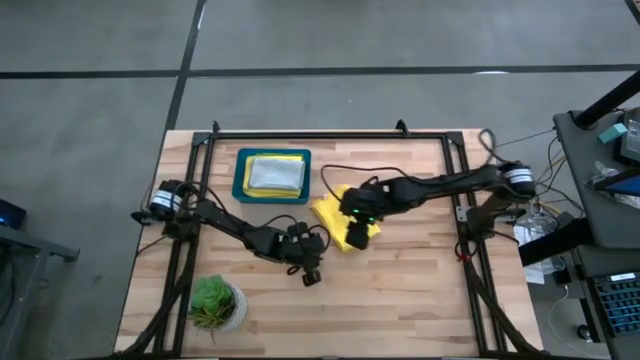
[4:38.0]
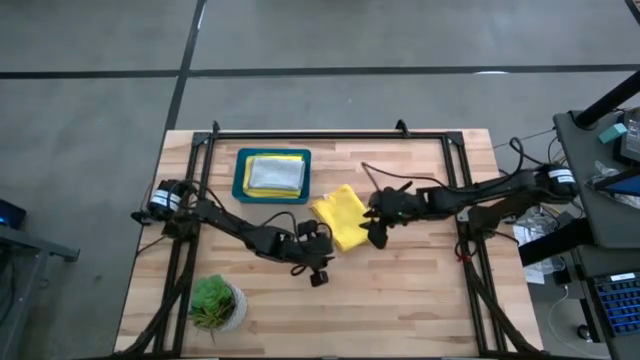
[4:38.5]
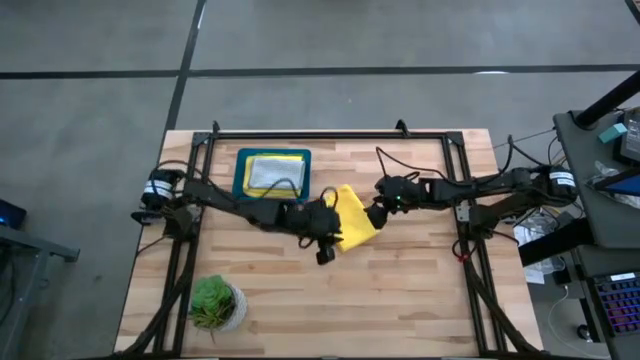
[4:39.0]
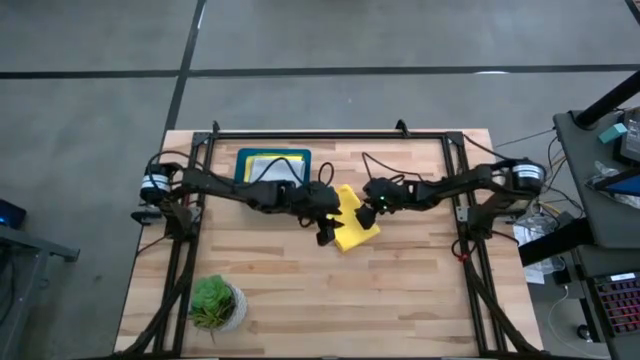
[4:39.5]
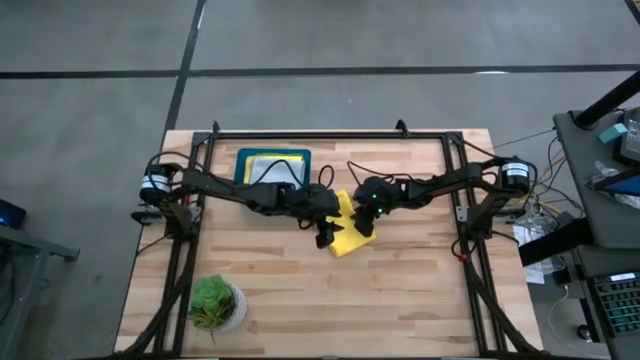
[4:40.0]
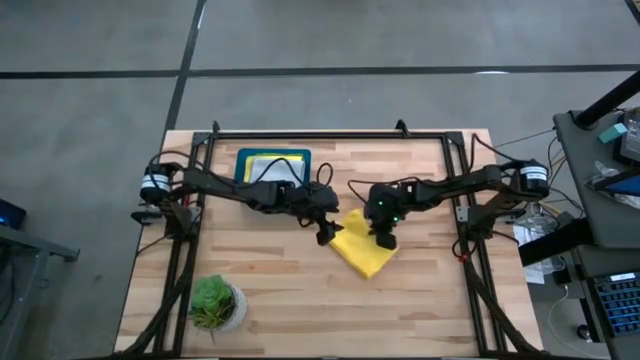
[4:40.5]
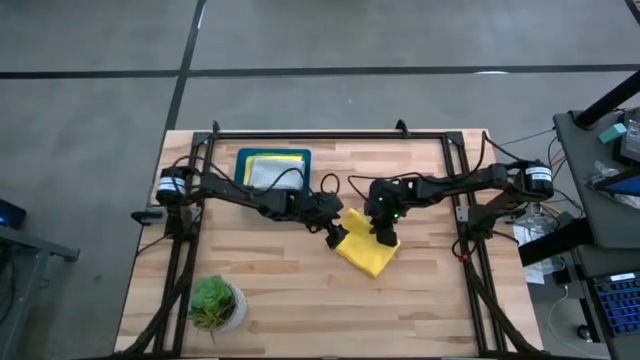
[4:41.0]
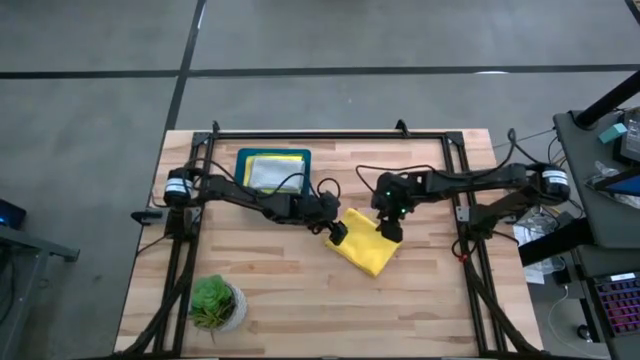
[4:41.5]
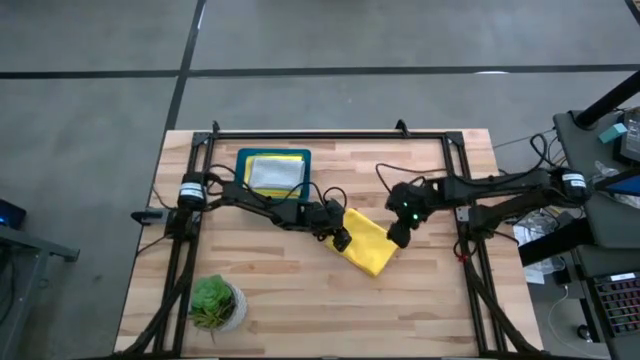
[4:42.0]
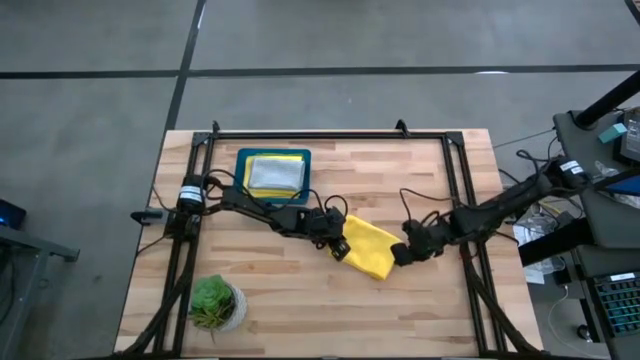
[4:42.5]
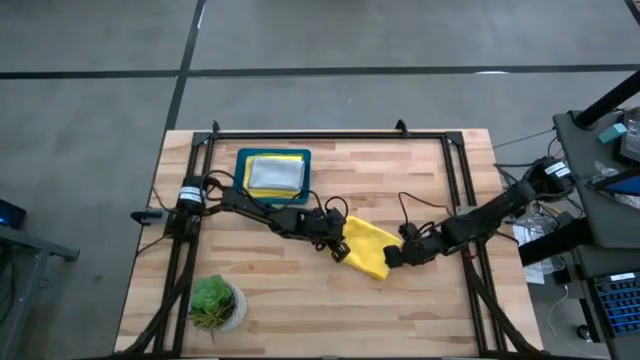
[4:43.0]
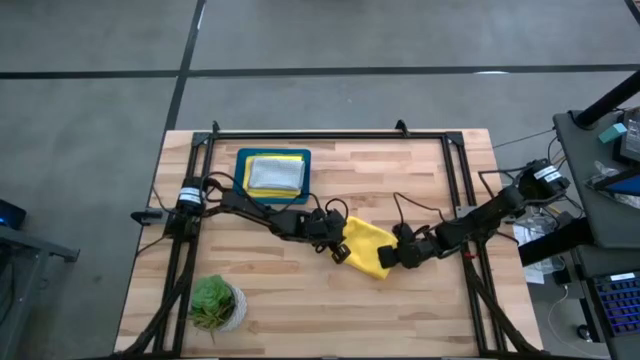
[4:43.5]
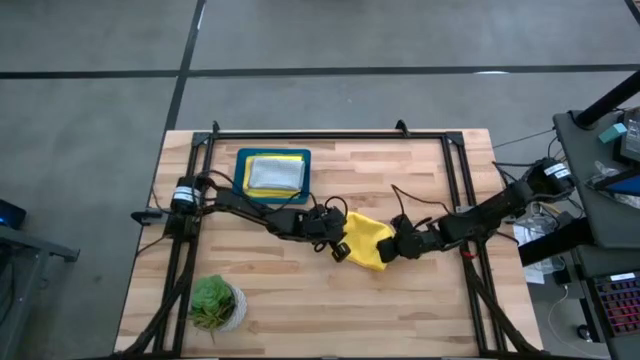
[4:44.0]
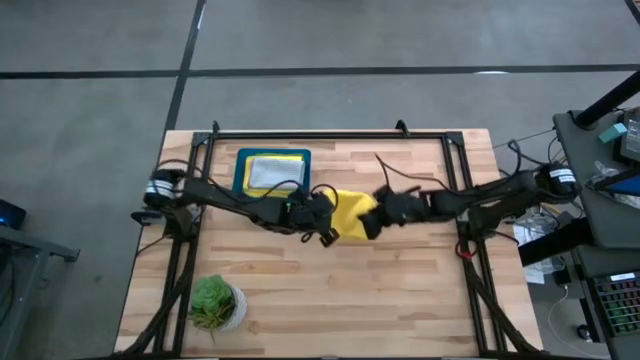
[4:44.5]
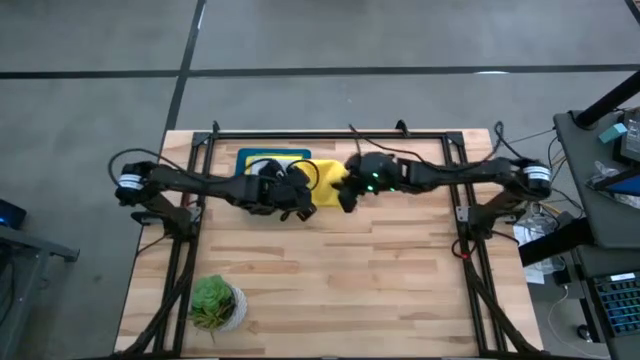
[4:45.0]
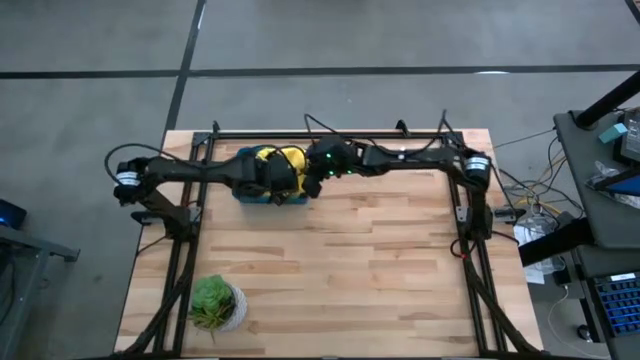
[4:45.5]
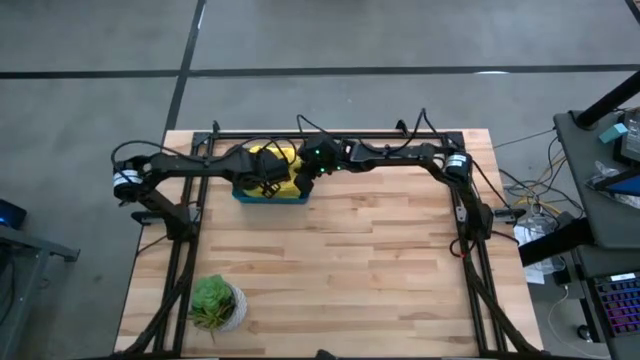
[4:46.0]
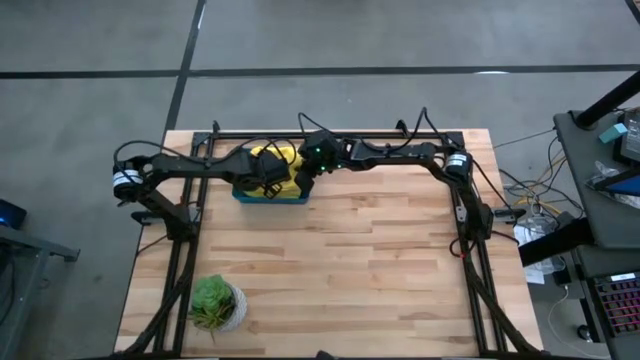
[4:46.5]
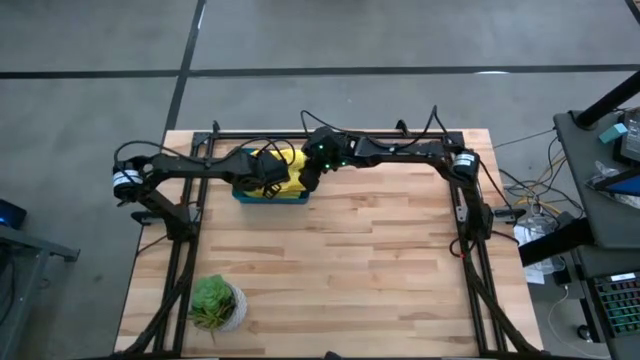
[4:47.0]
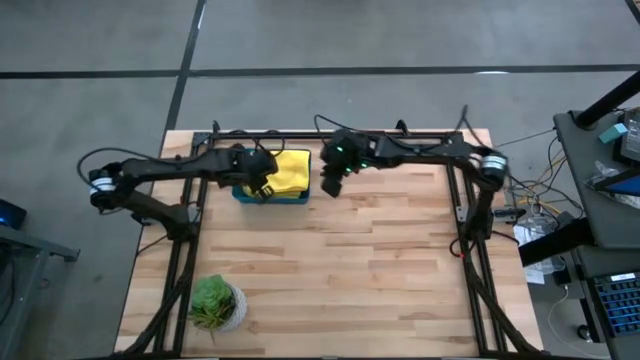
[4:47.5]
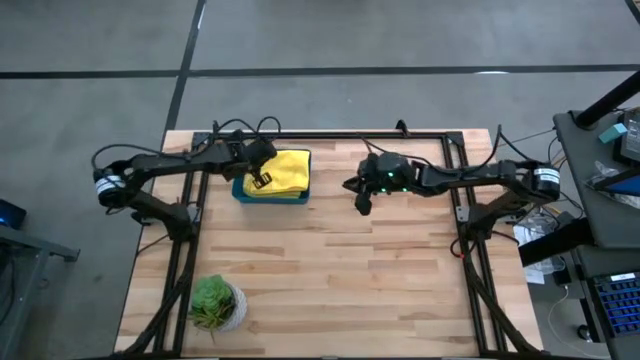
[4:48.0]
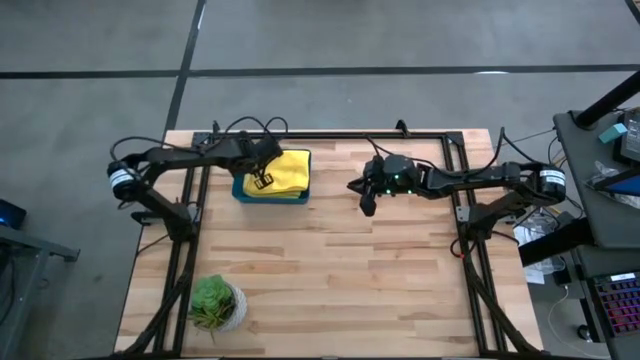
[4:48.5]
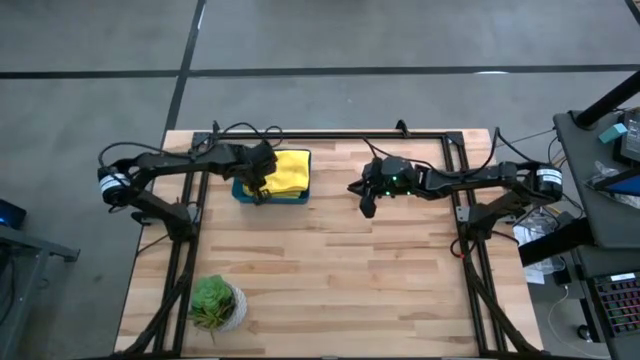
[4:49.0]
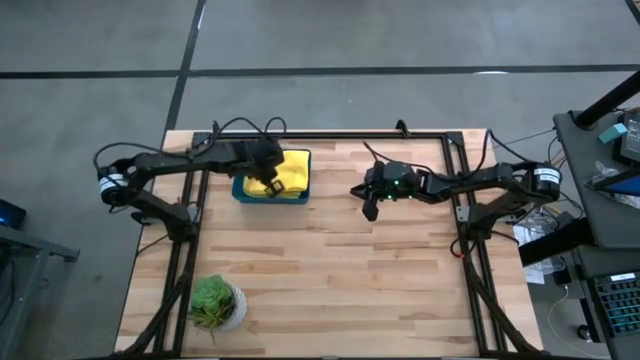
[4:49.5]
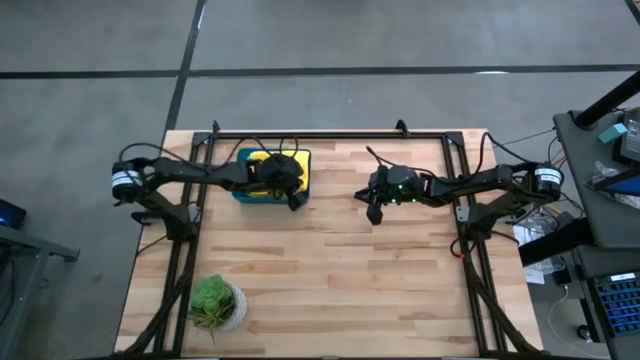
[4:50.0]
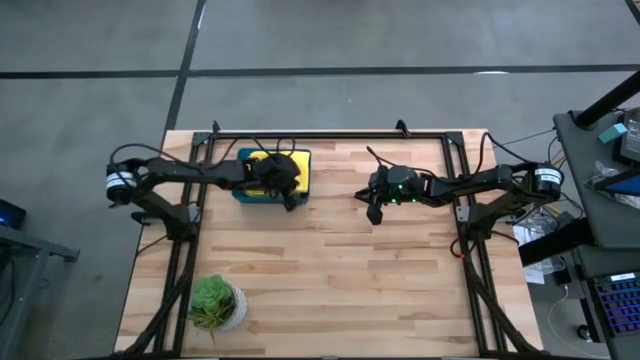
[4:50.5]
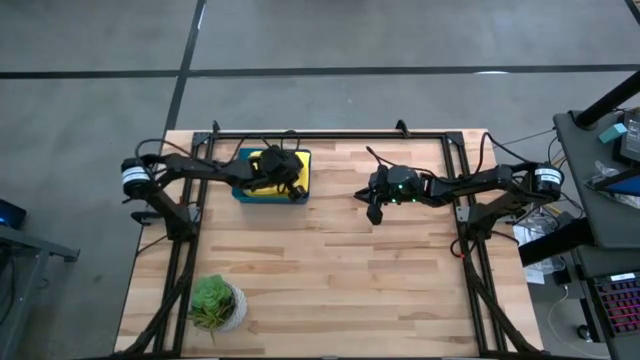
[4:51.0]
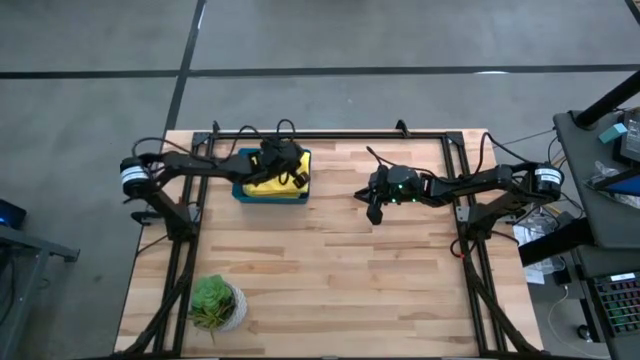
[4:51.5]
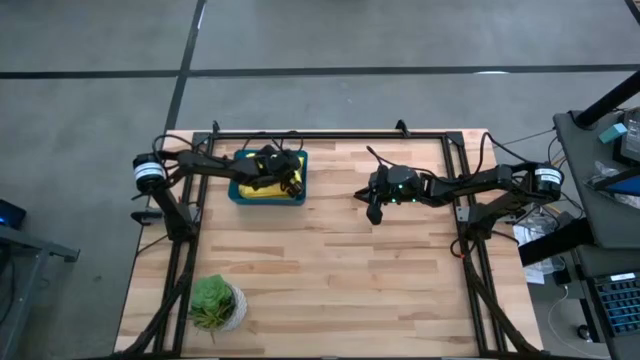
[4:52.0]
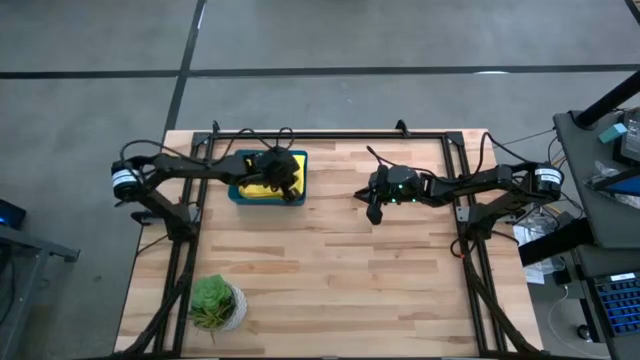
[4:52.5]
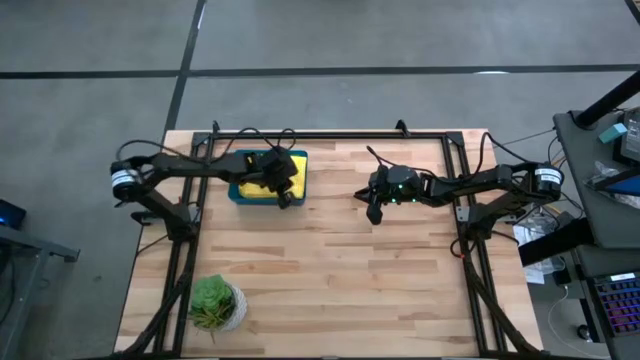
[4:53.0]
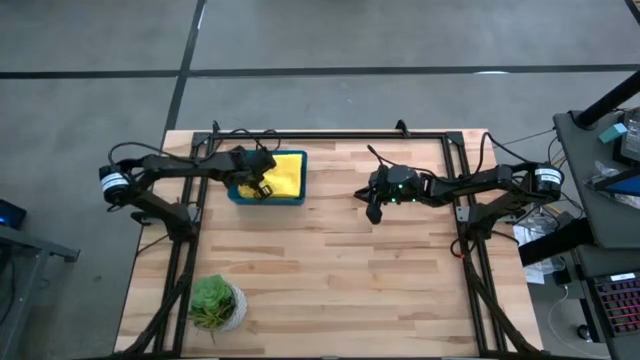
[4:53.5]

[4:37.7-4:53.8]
Task: Fold microfiber towels
Put the yellow microfiber towel into the blue bin

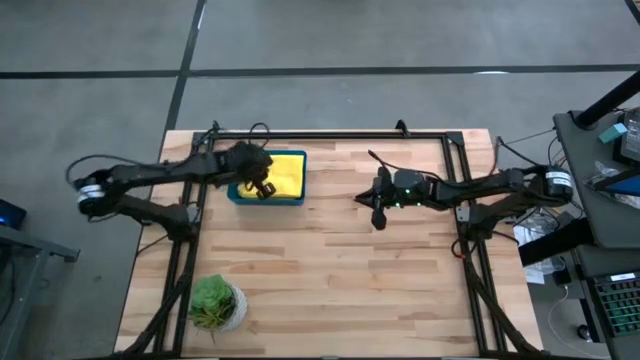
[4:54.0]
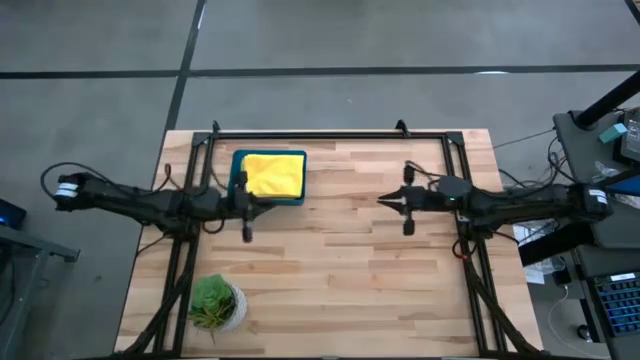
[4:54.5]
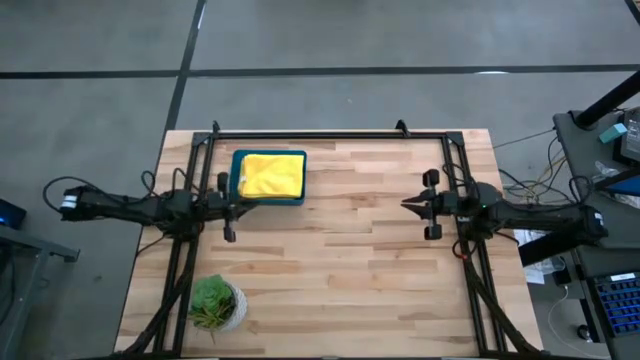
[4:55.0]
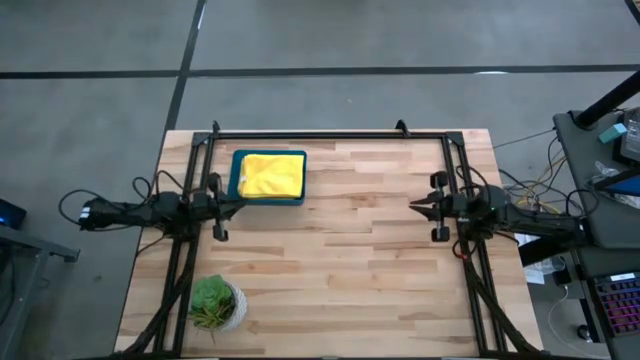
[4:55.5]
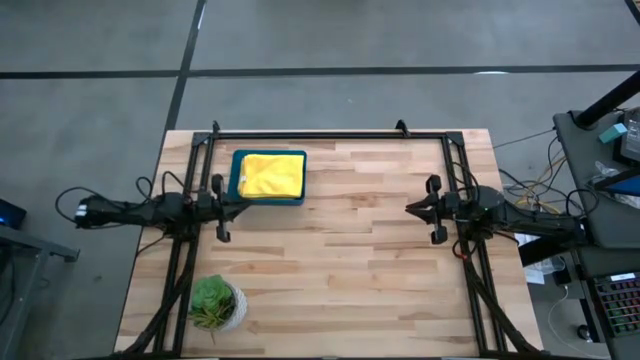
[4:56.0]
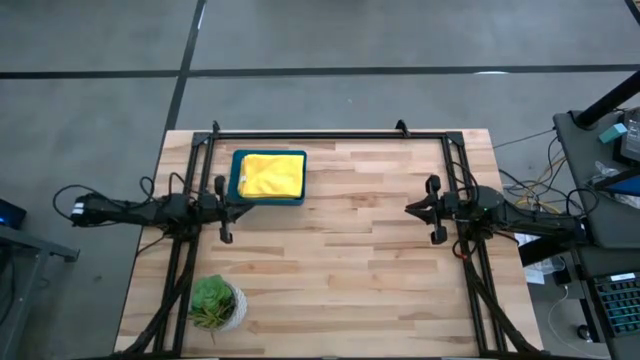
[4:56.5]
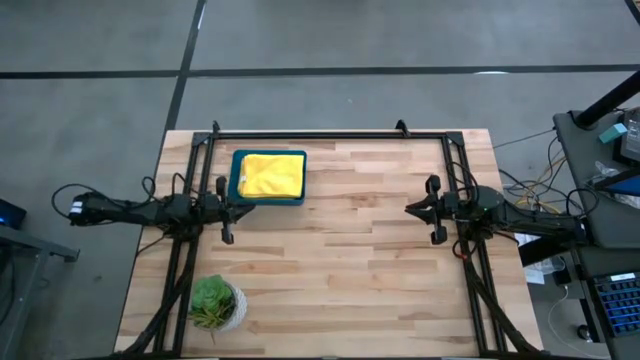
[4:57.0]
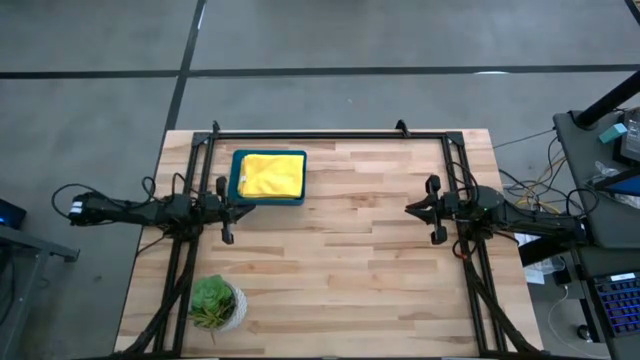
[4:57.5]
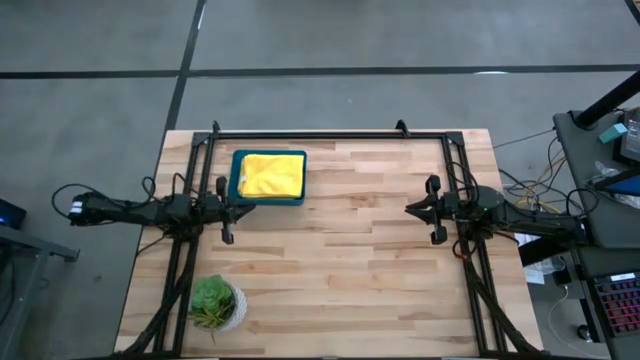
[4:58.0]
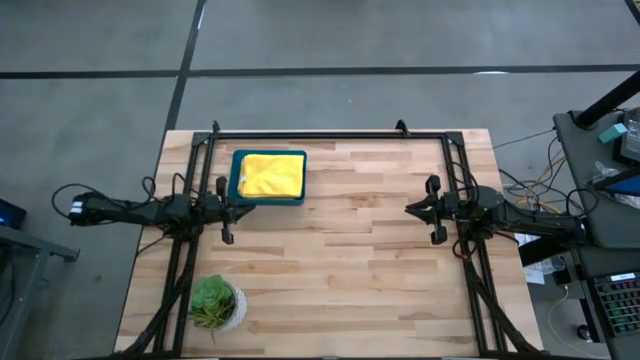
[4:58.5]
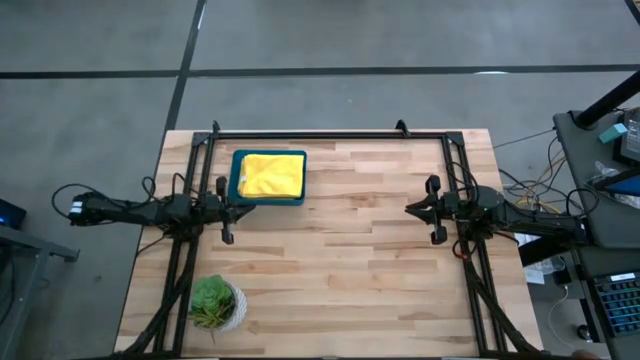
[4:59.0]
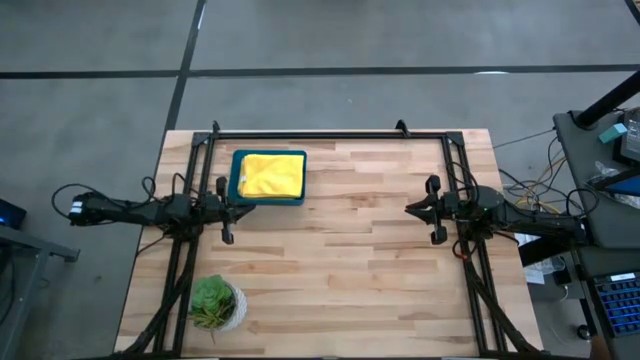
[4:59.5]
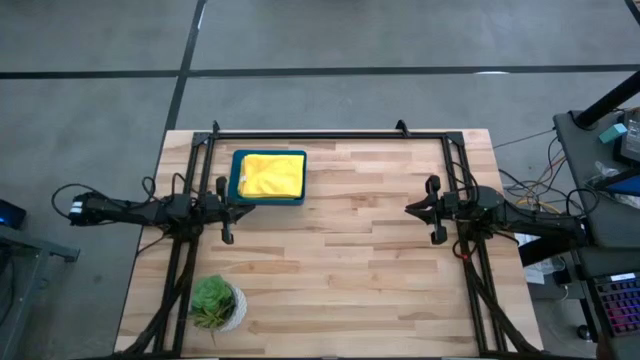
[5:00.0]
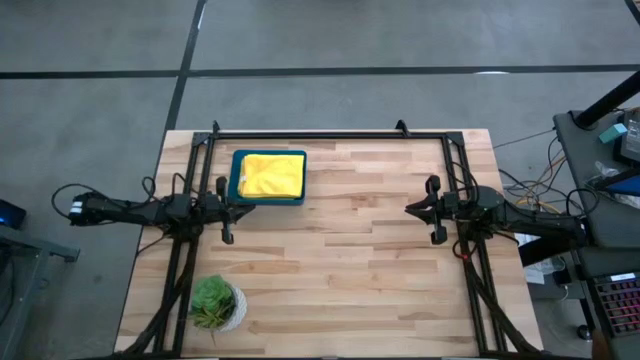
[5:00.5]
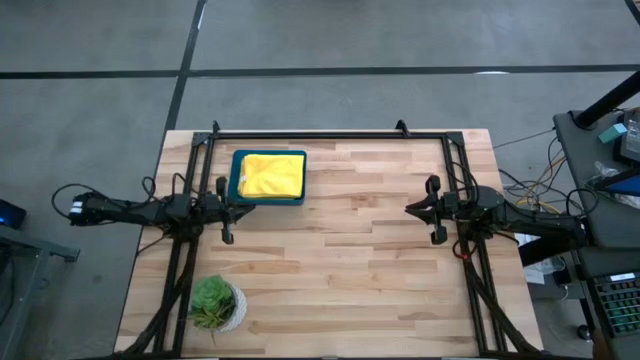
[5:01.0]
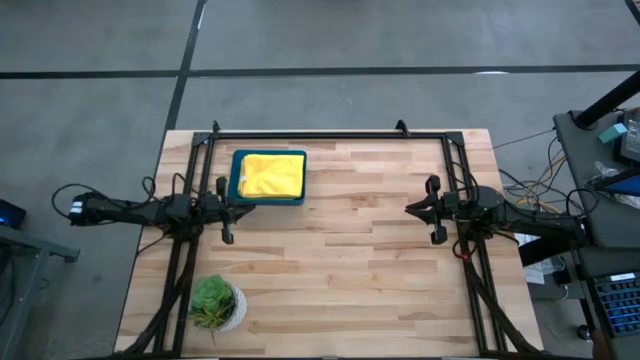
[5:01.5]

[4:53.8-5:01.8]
Return to Home Position
